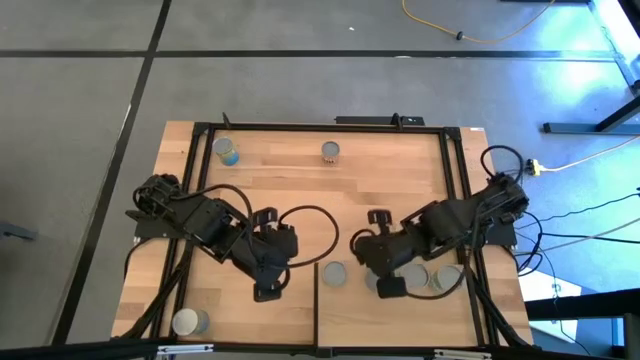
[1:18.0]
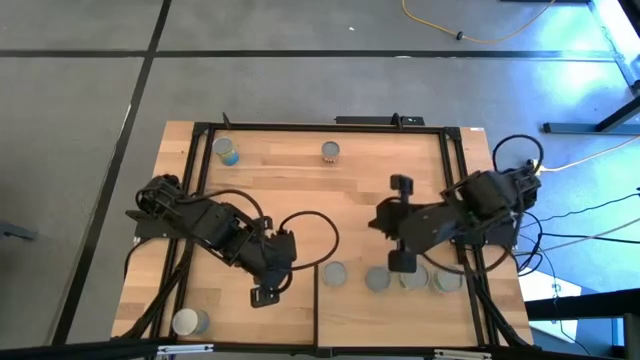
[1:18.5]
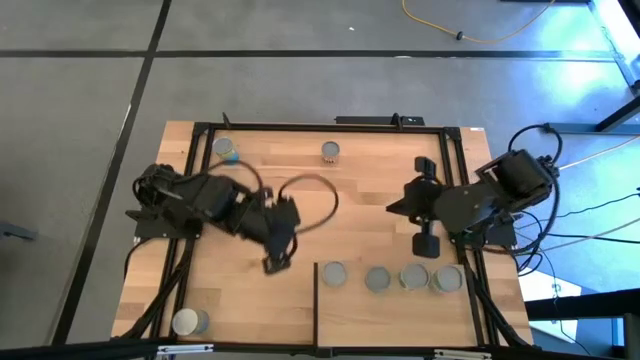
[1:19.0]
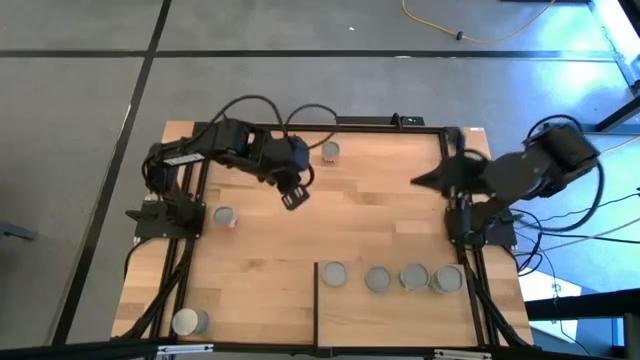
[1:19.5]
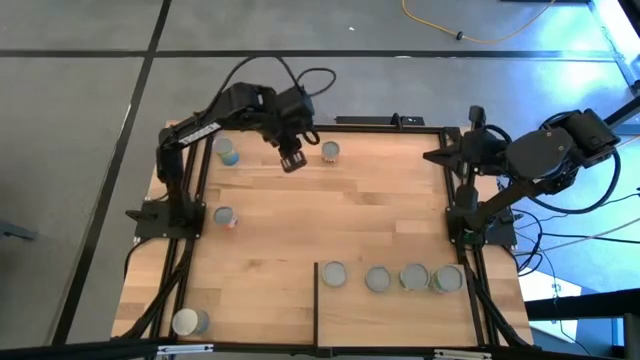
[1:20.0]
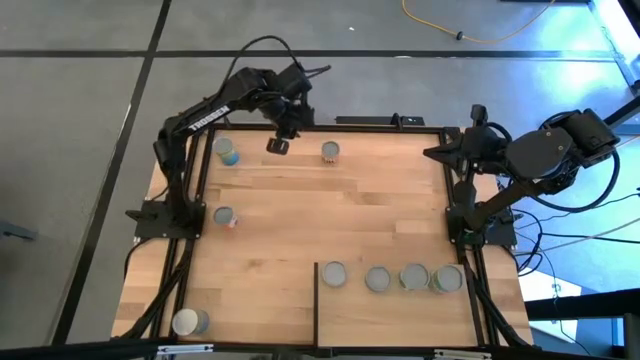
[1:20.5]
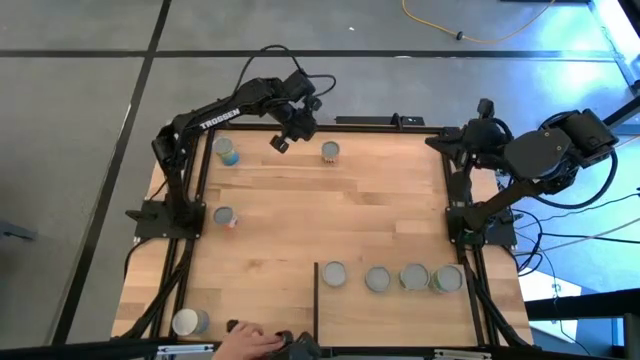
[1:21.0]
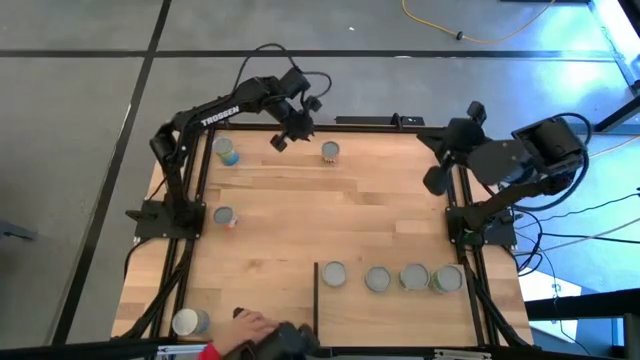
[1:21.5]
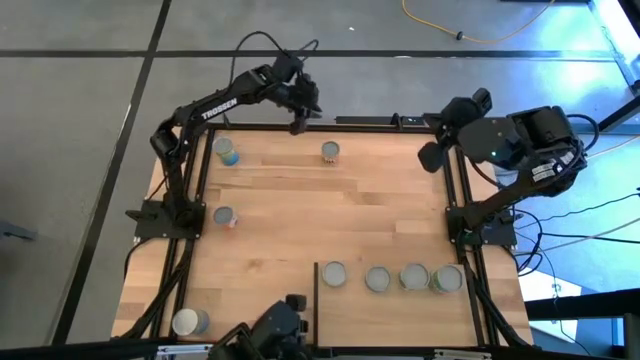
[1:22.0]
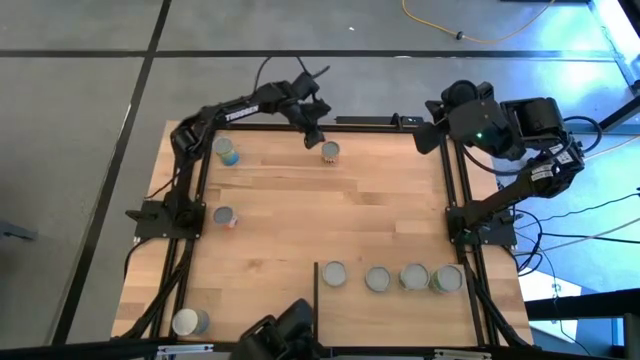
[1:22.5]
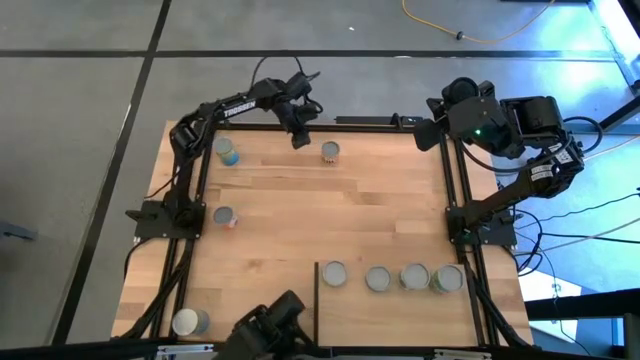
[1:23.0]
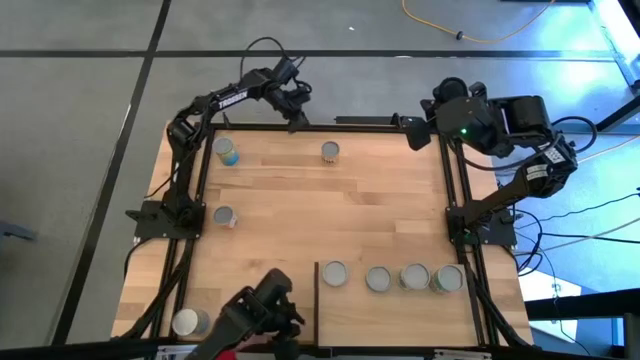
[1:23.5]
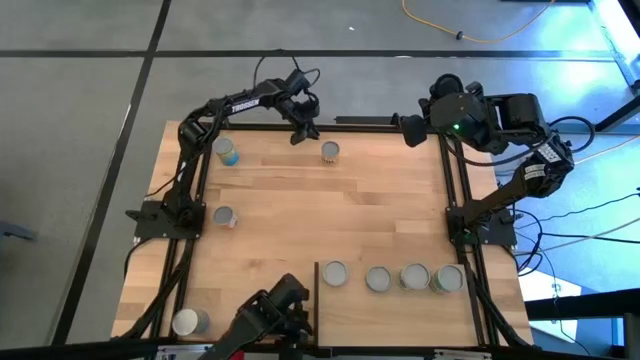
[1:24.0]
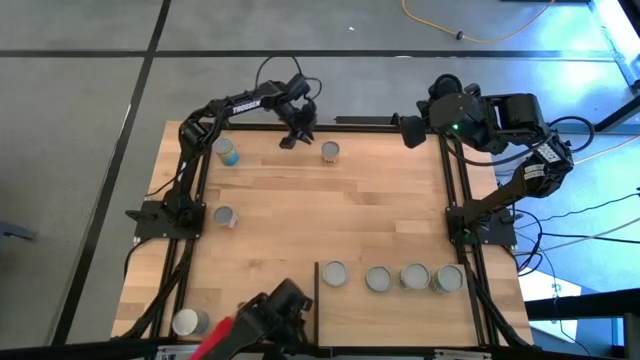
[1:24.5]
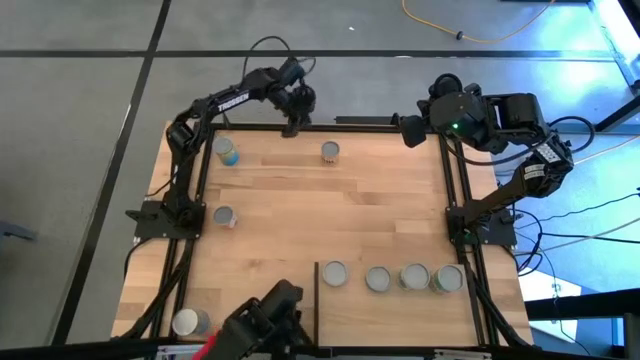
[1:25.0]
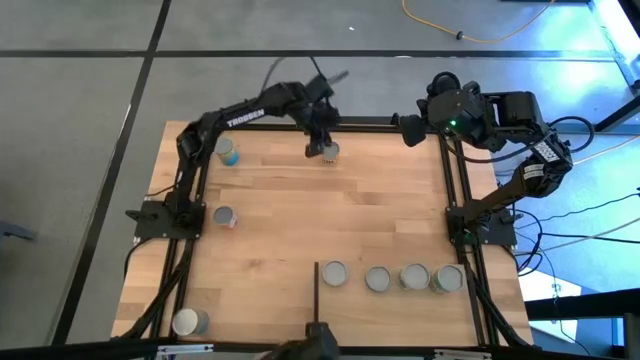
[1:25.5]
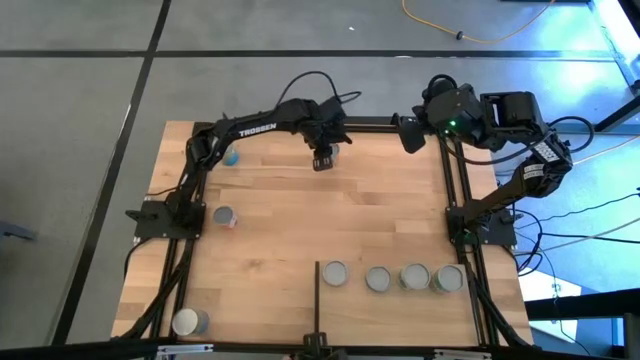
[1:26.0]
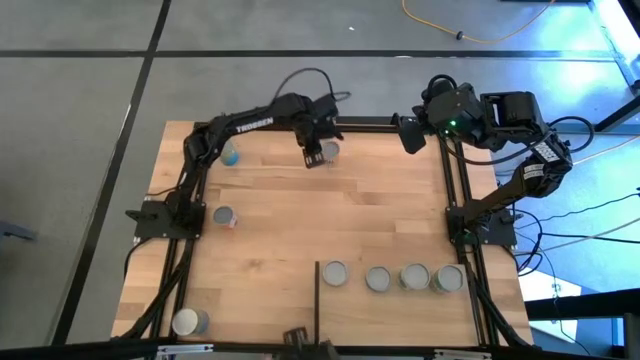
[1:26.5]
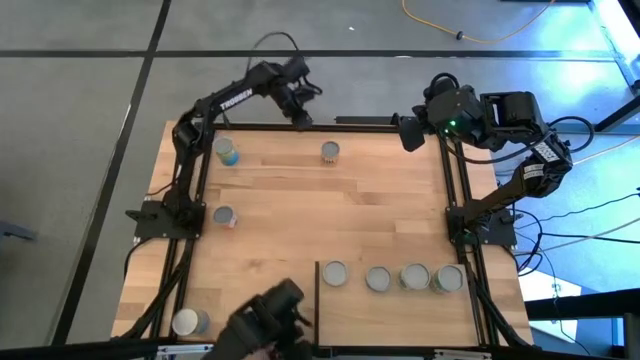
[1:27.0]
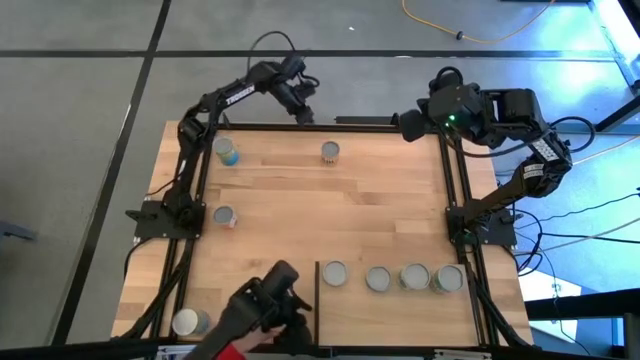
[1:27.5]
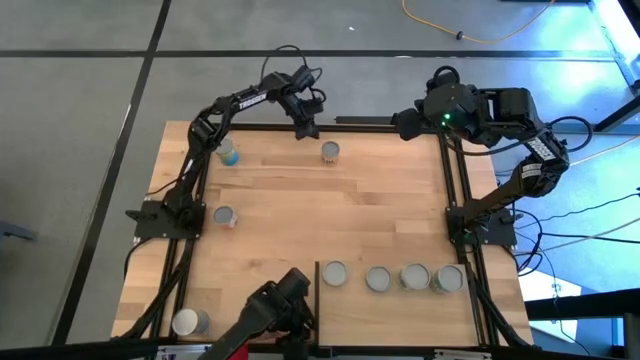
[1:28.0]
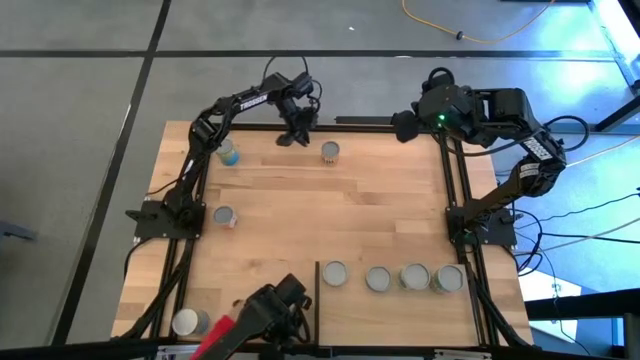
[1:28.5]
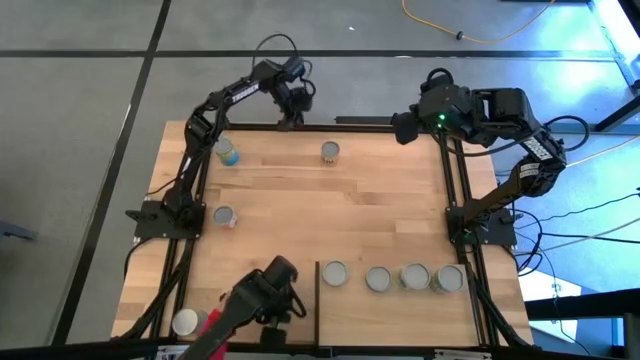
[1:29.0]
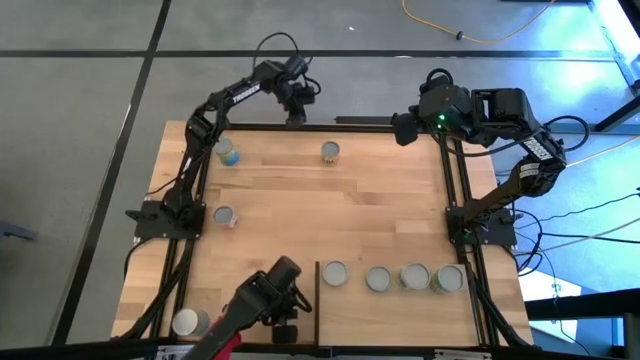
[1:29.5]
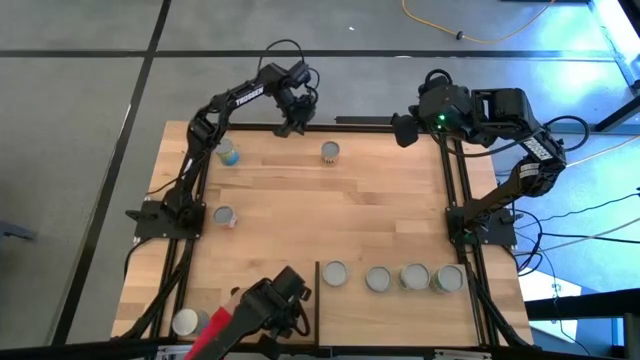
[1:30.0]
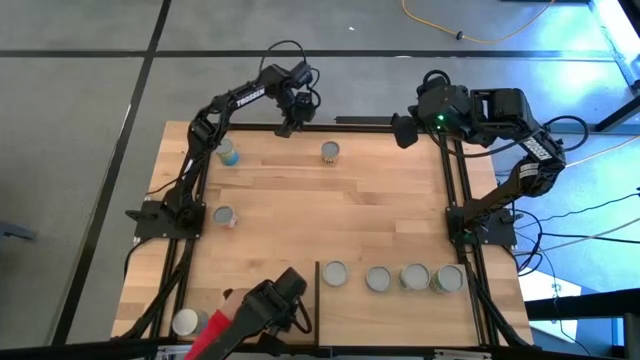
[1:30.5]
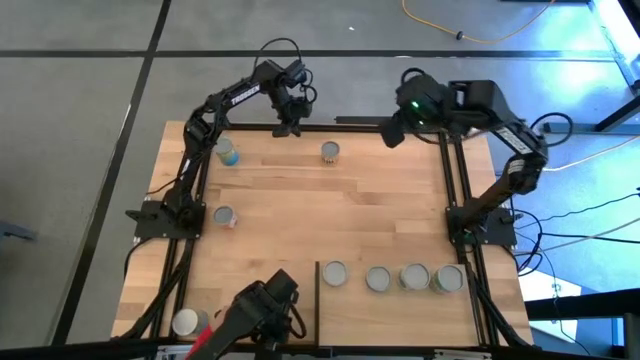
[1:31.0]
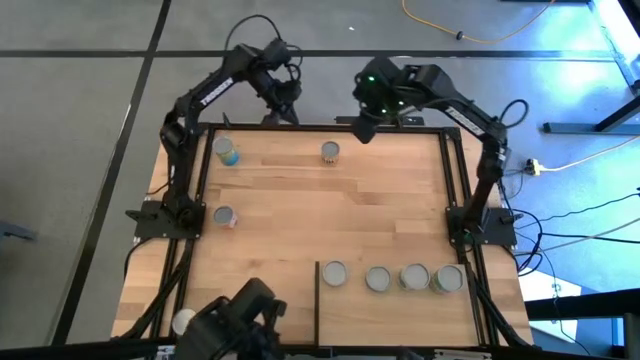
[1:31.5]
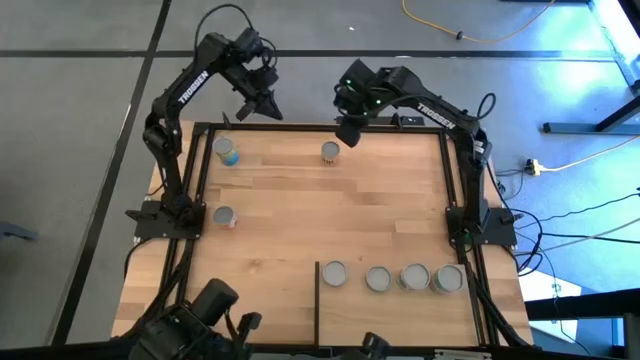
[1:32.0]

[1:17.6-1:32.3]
Task: Pick and place cans onto a shelf
Put the yellow canned black beans on the shelf

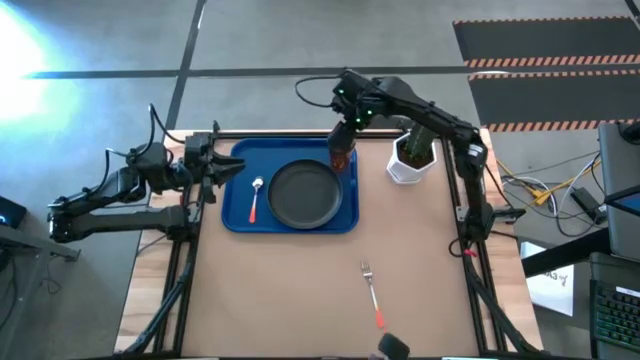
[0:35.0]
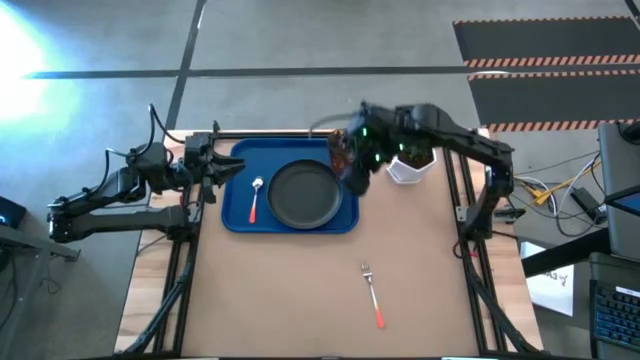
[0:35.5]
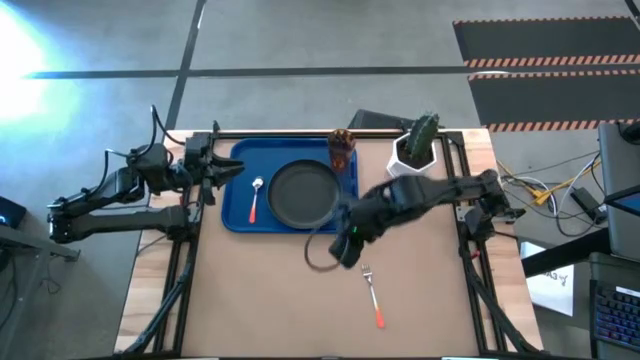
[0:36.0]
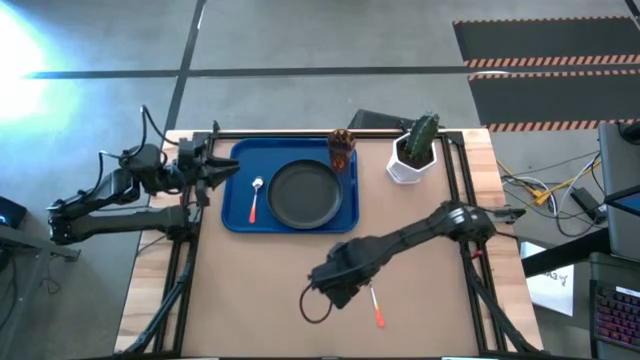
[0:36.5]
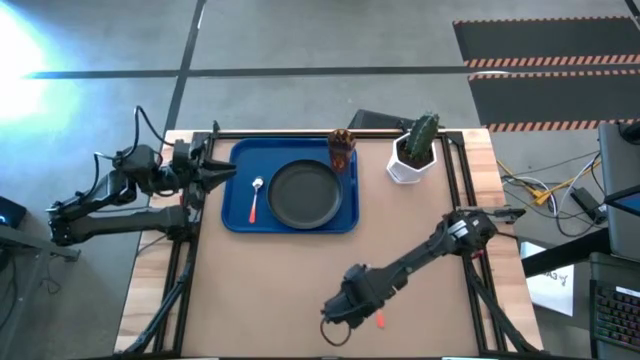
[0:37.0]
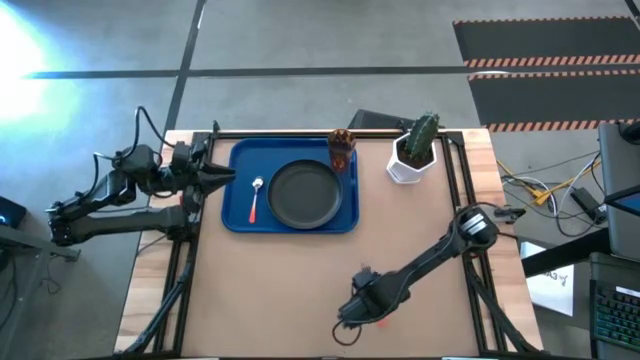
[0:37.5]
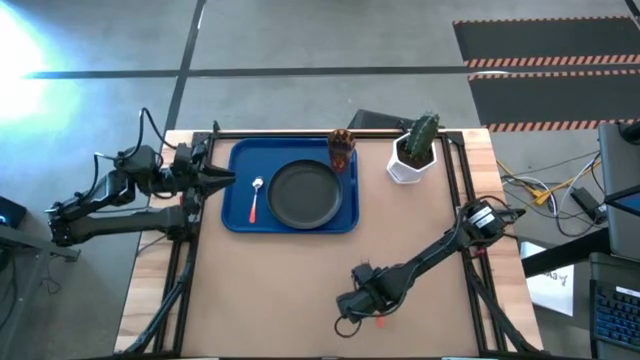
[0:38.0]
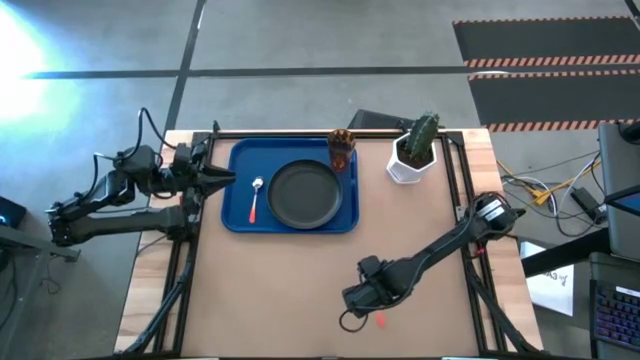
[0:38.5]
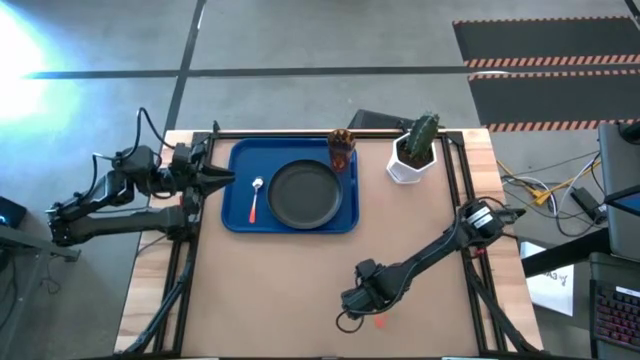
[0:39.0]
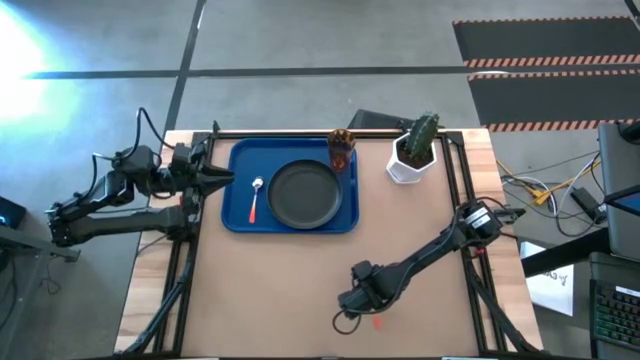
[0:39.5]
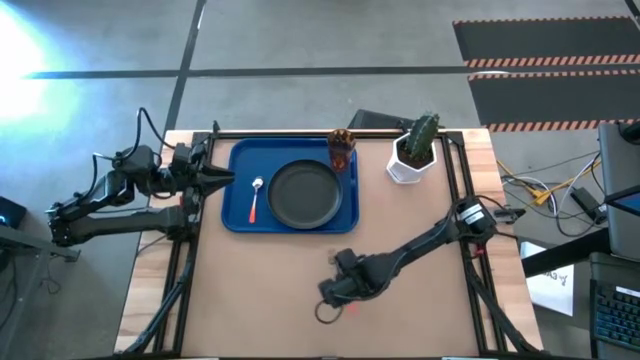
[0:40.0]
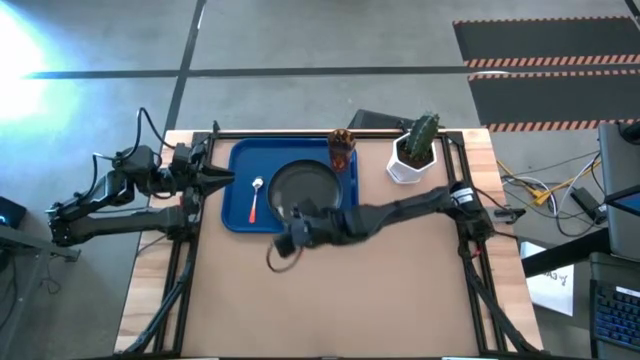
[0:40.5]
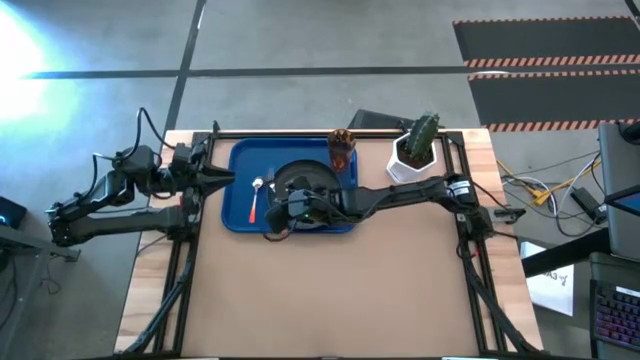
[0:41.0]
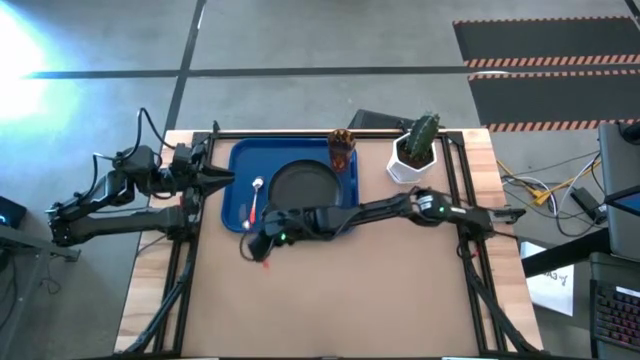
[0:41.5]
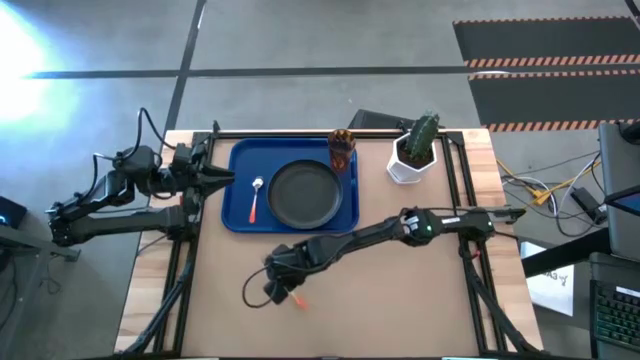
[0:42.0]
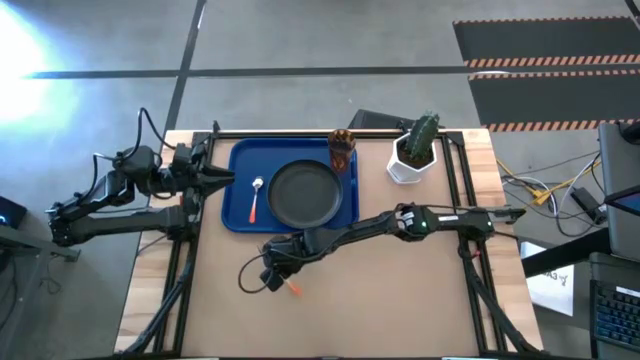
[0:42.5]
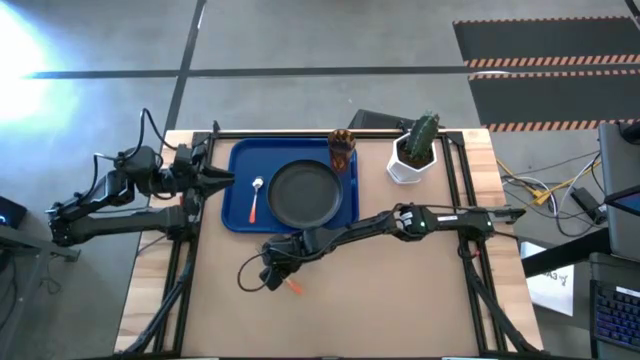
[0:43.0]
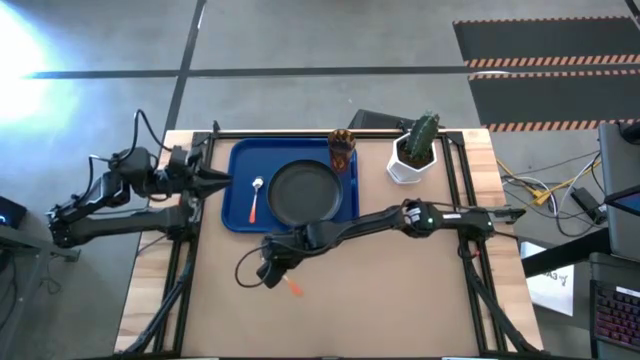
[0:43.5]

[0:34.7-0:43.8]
Task: Pick and place plate/cup/fork/spoon on tray
Move the orange fork on the table
